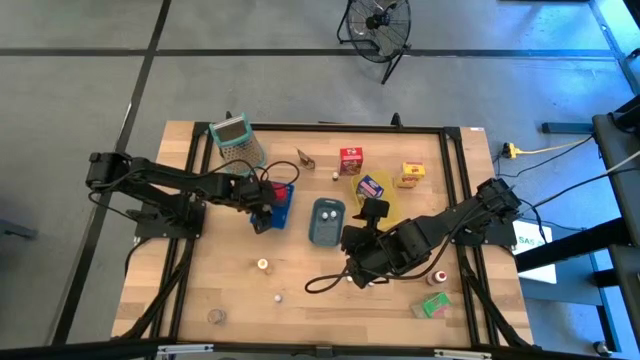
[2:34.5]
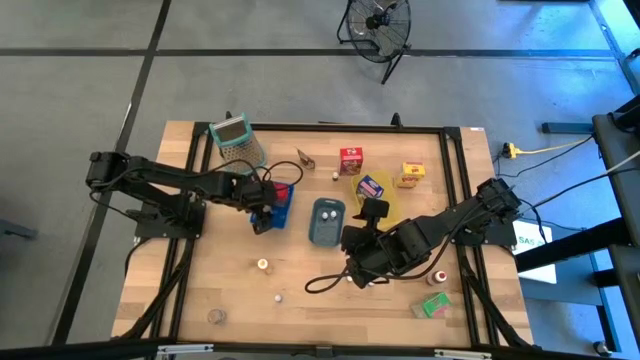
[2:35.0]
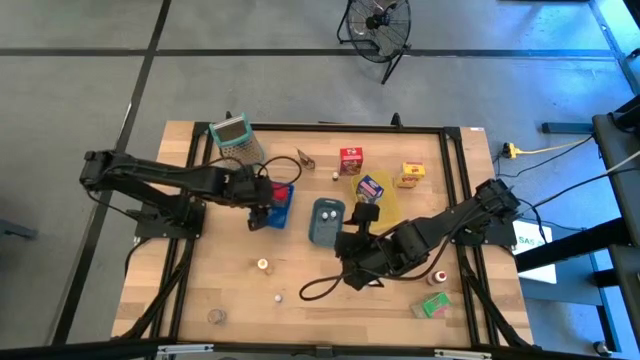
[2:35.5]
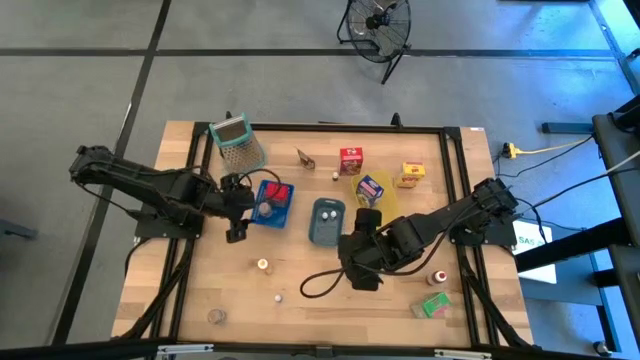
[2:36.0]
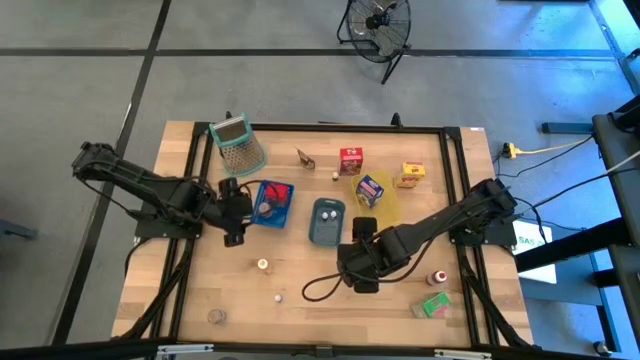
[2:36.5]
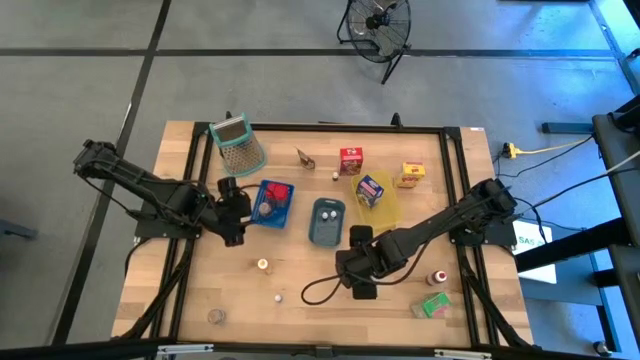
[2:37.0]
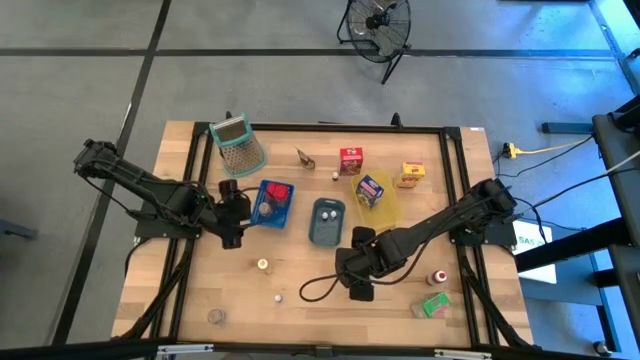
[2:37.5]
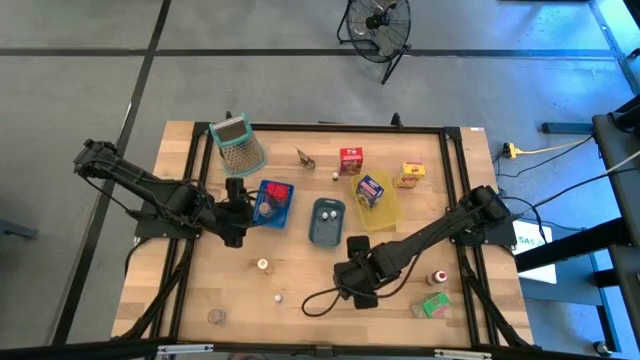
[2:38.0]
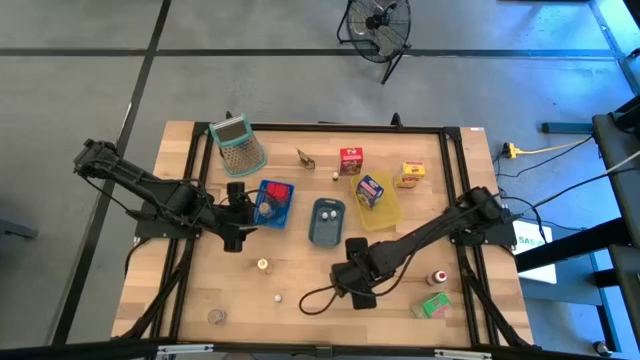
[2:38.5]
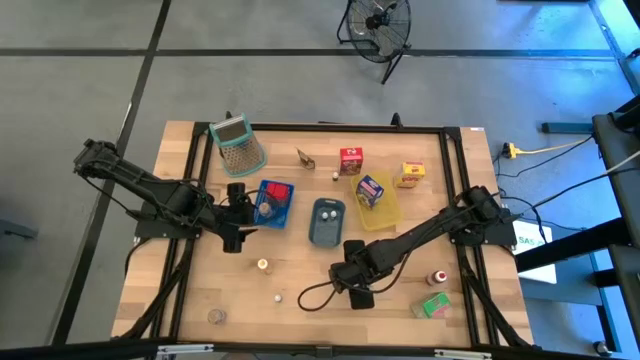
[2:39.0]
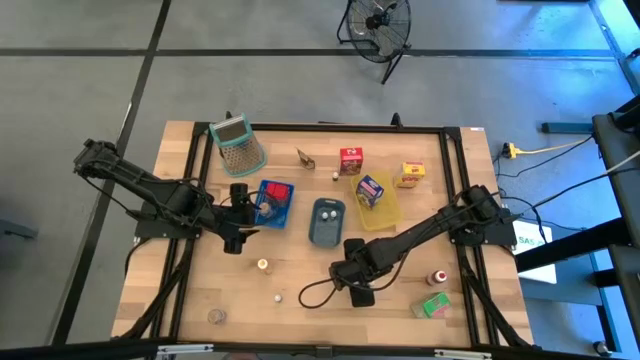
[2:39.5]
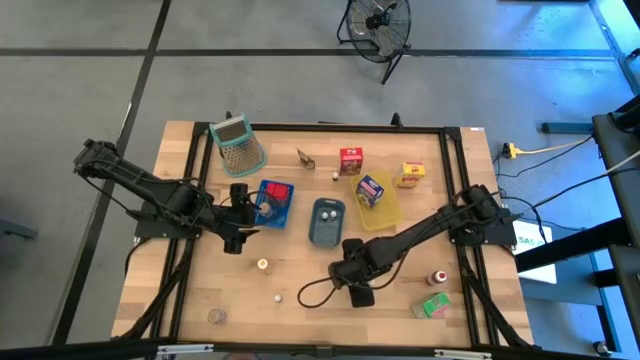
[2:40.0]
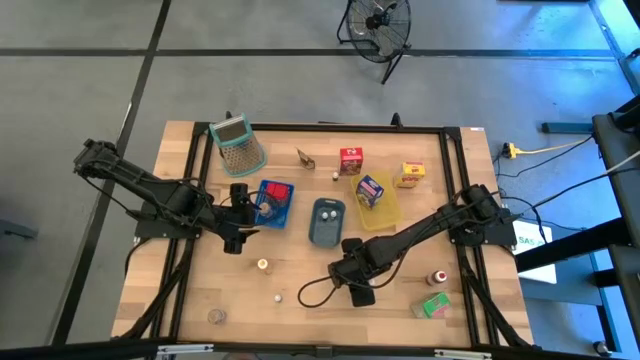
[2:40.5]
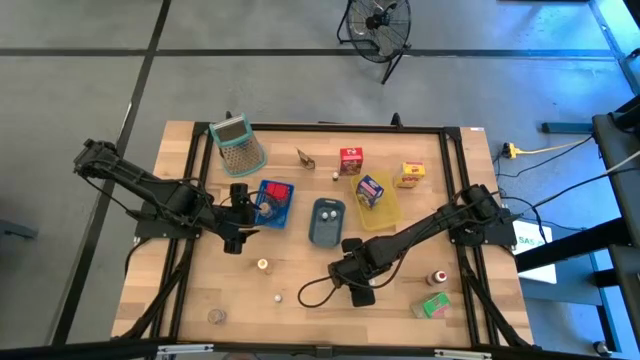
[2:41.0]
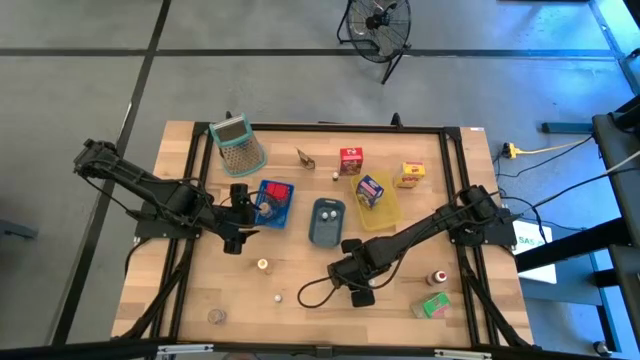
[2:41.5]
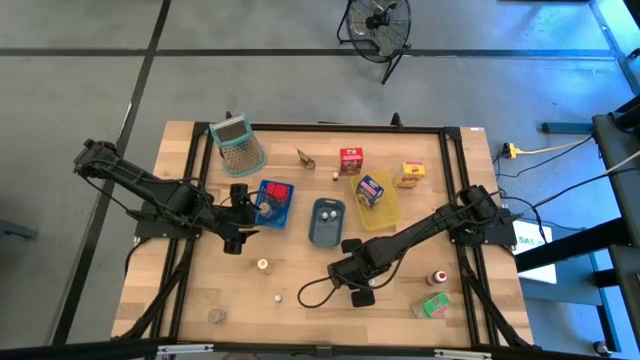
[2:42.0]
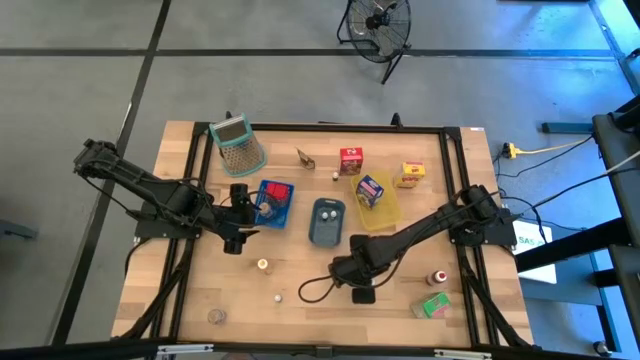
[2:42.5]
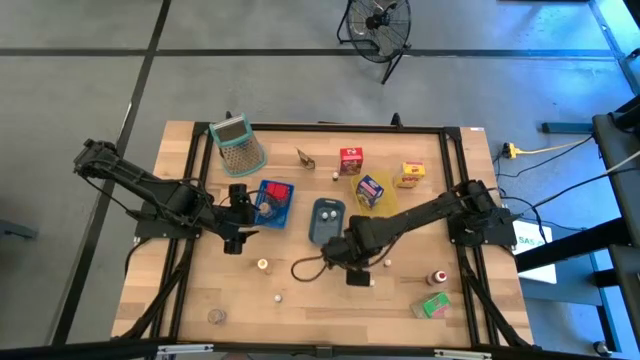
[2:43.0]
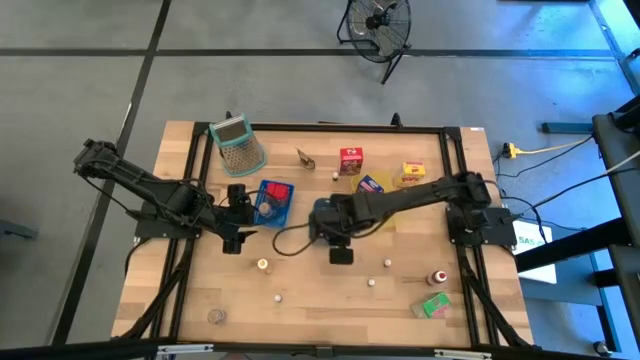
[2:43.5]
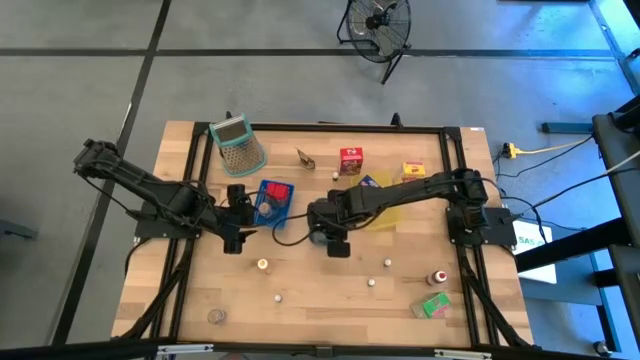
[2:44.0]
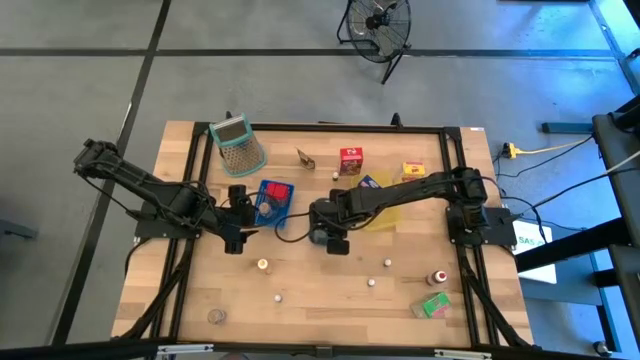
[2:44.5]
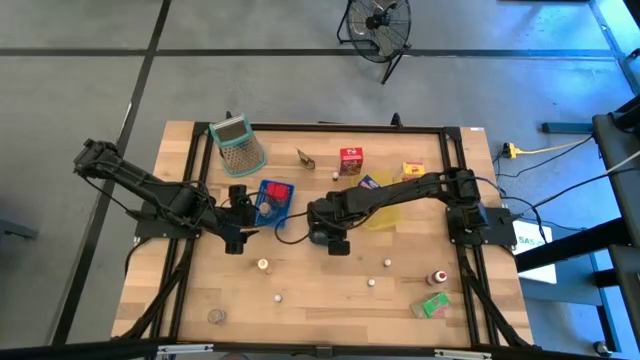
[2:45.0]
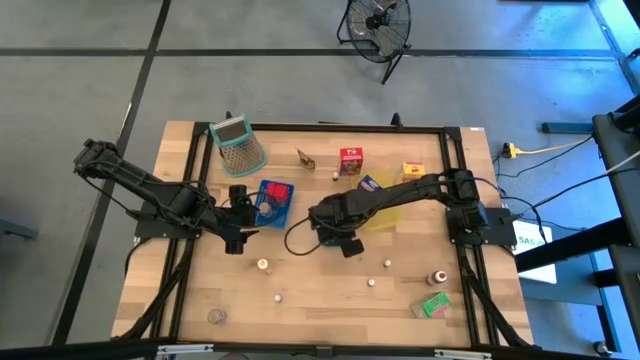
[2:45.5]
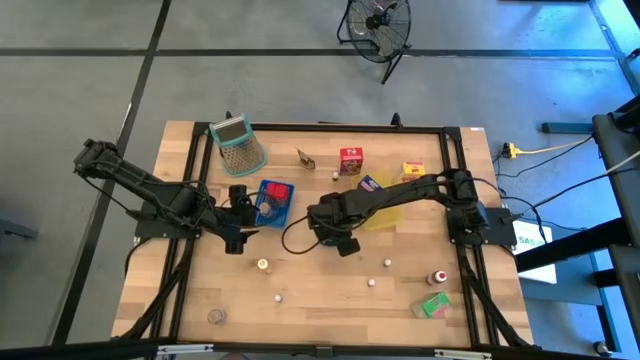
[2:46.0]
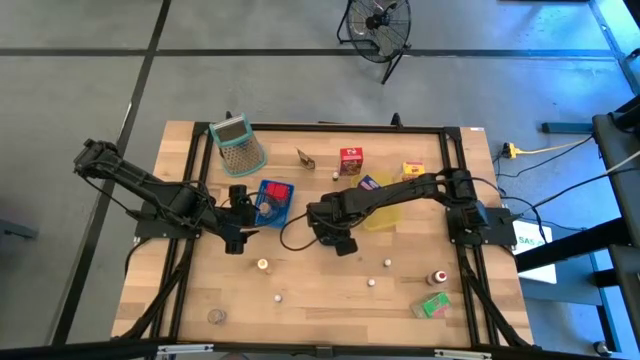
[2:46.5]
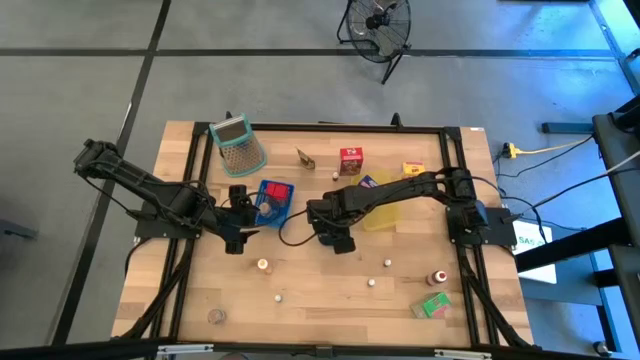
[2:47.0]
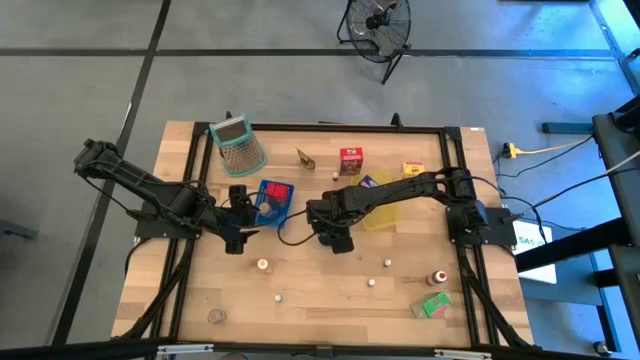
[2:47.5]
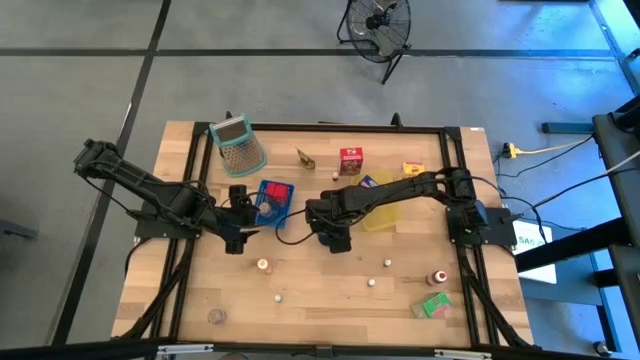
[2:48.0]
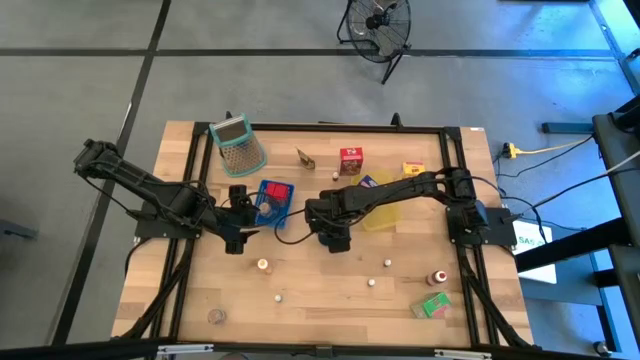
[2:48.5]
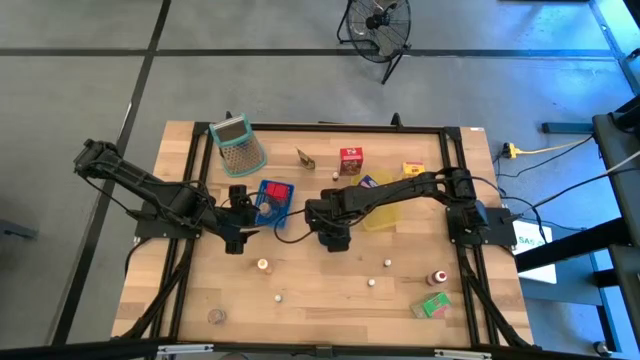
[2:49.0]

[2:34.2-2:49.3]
Task: Pick & Place Kitchen Items
Put the small yellow food coloring into the green bin

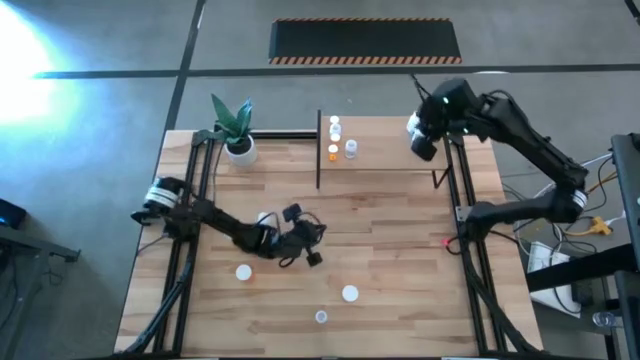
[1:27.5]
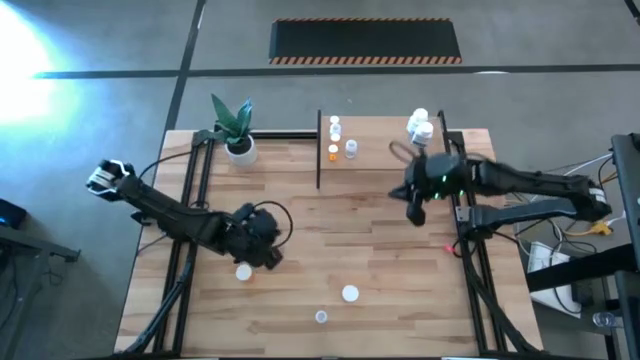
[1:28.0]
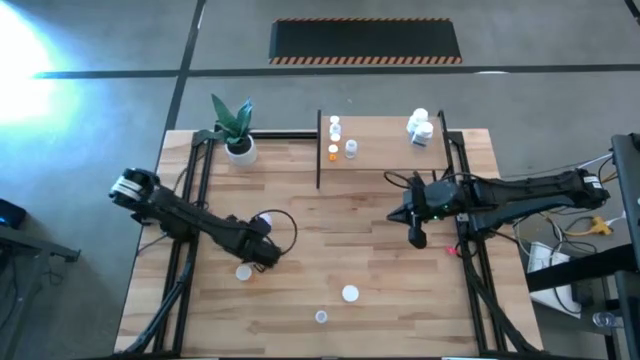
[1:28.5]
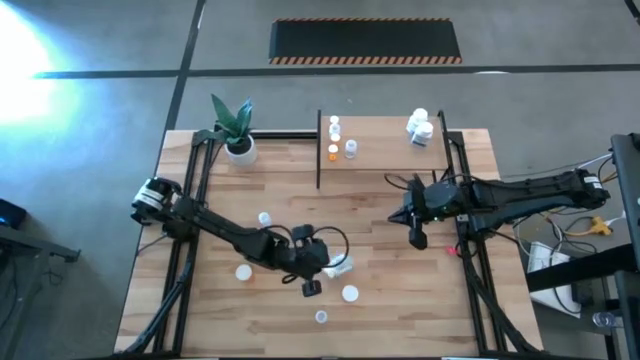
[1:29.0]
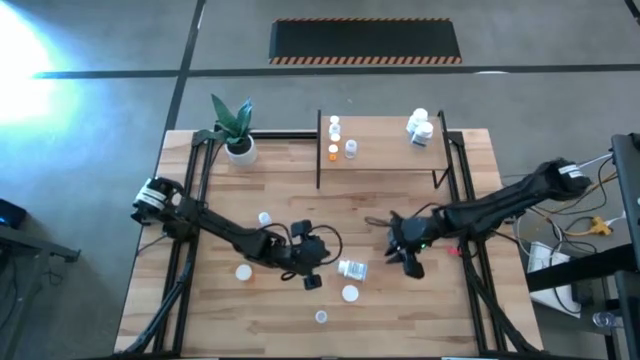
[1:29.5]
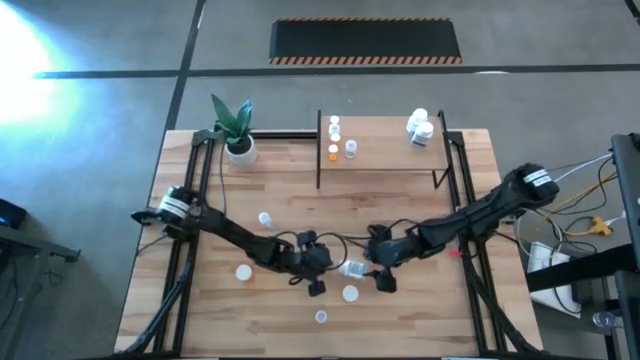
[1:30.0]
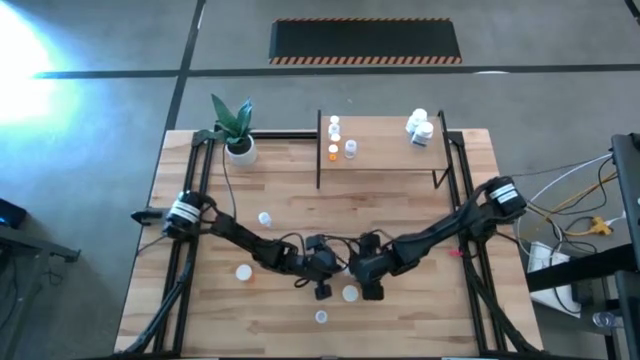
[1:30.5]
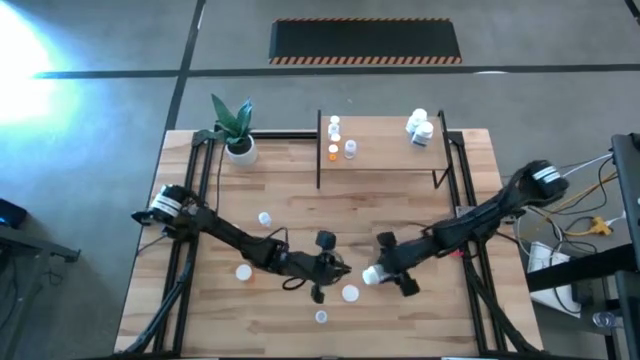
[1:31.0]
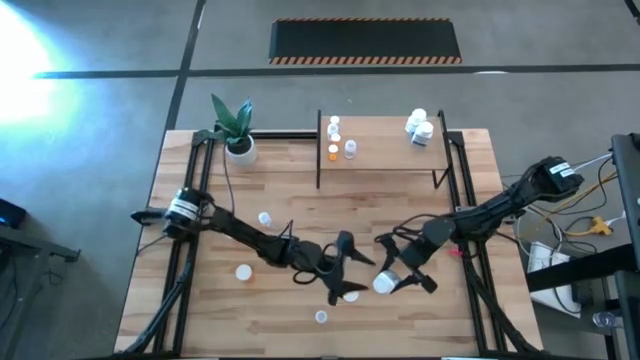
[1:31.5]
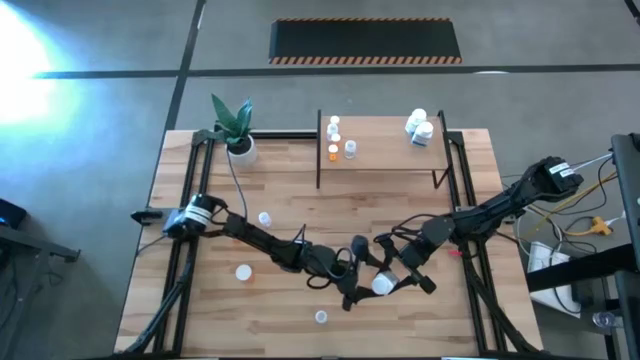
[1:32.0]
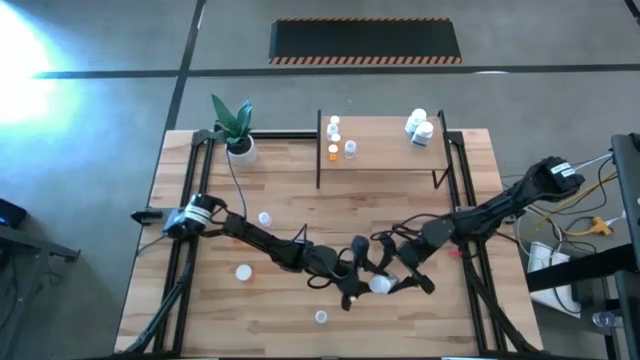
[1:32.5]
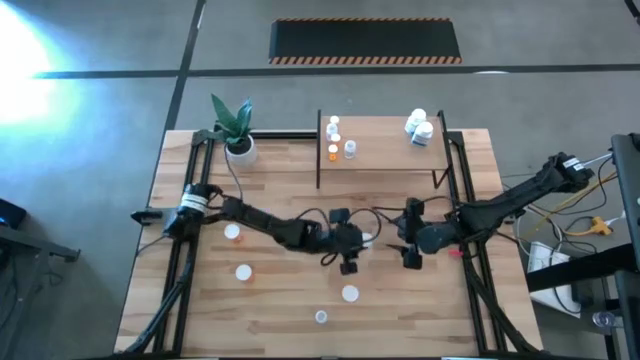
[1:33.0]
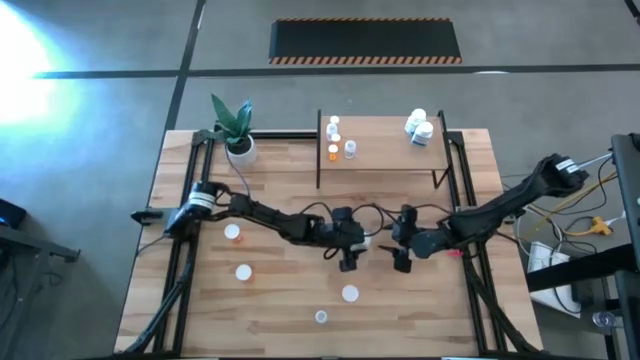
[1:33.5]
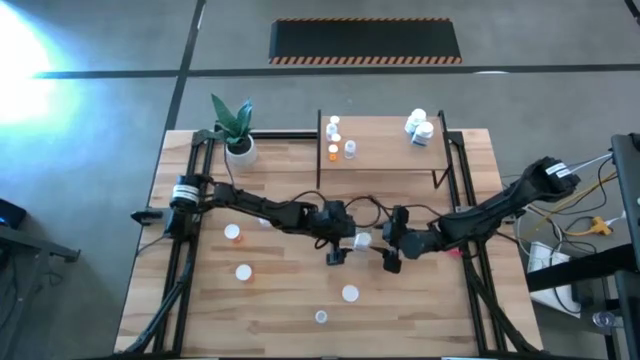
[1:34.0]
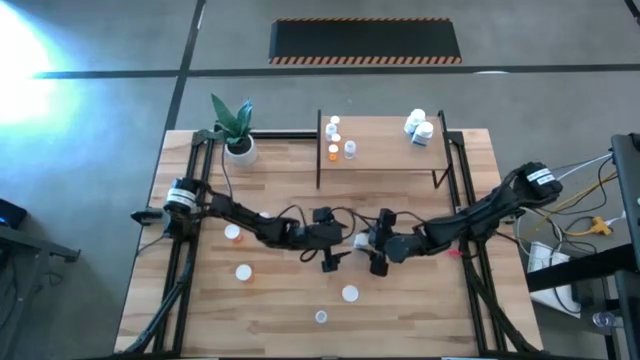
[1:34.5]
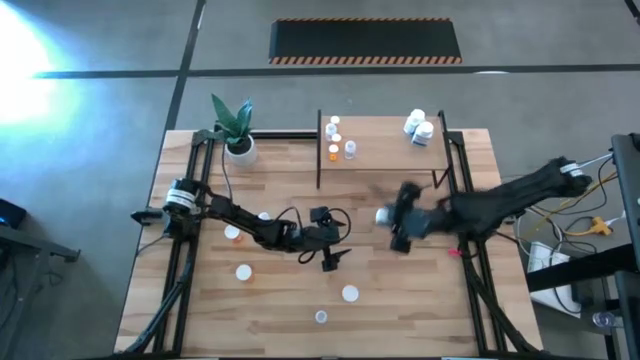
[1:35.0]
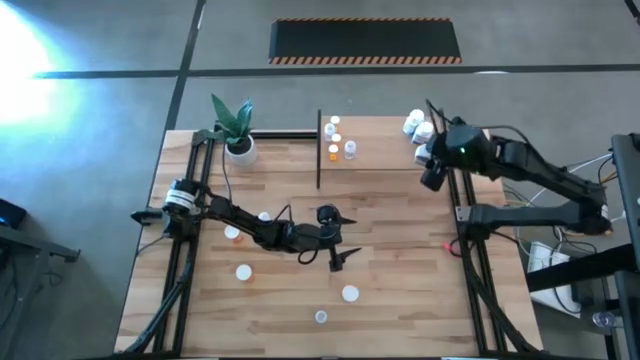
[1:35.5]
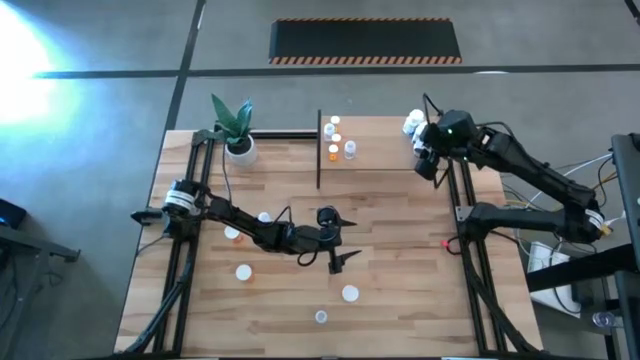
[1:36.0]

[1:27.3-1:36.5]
Task: Pick and place medicine bottles onto shelf by color
Put the white pill bottle on the shelf aligned with other white pill bottles
